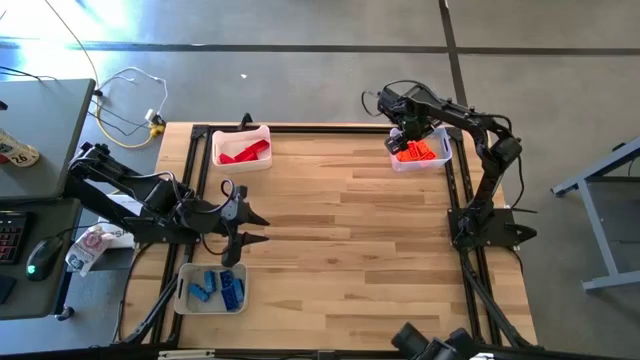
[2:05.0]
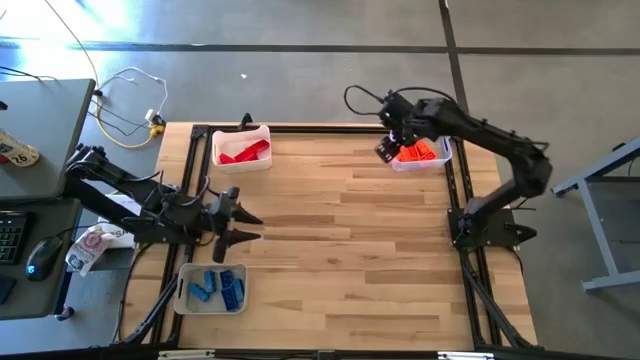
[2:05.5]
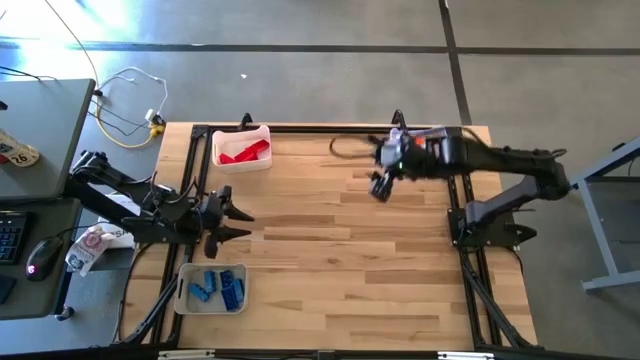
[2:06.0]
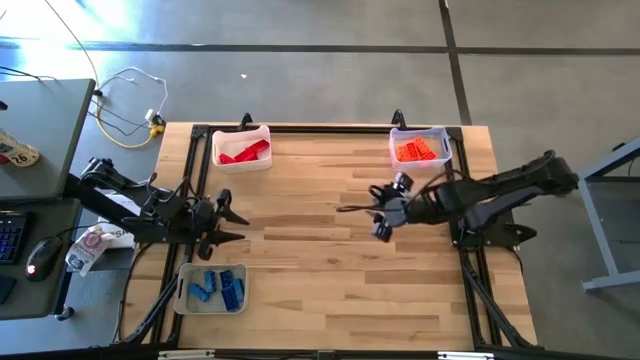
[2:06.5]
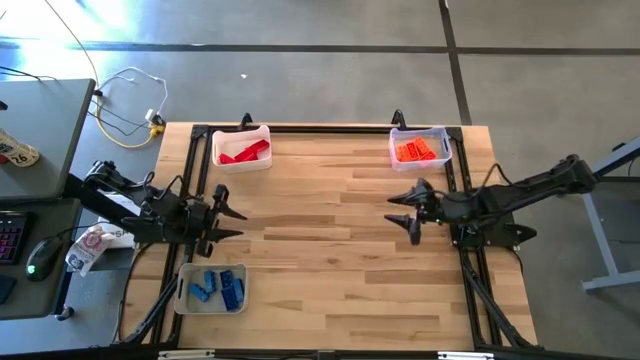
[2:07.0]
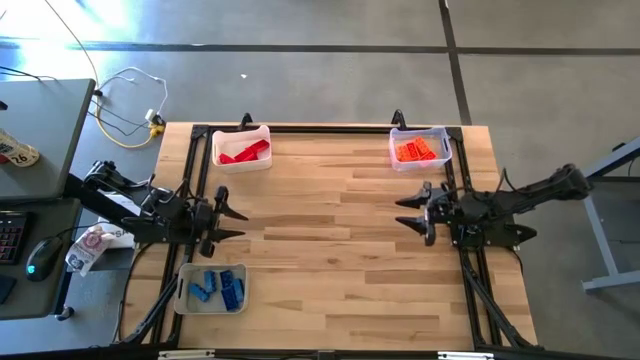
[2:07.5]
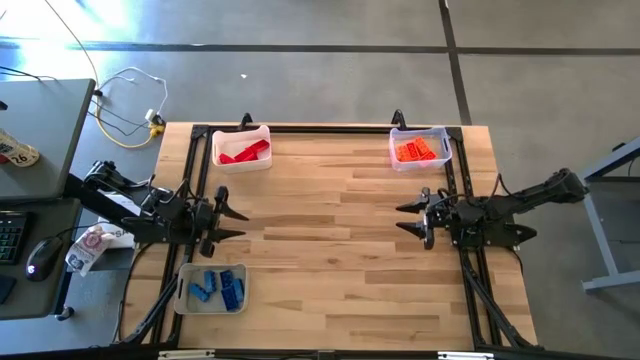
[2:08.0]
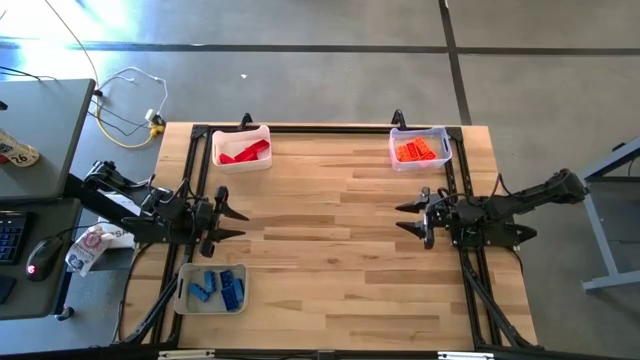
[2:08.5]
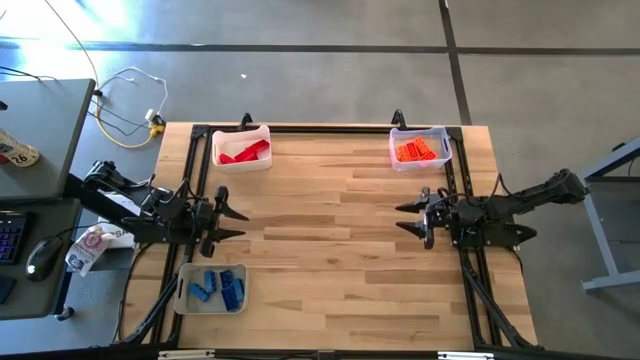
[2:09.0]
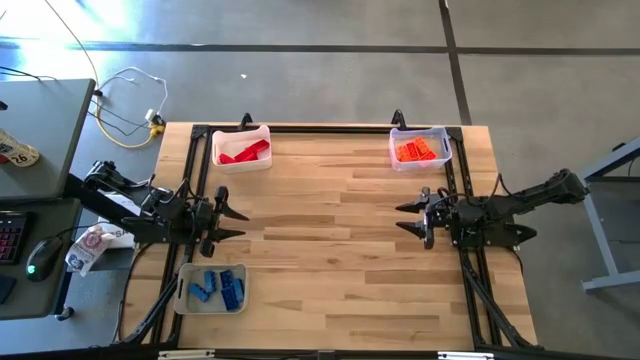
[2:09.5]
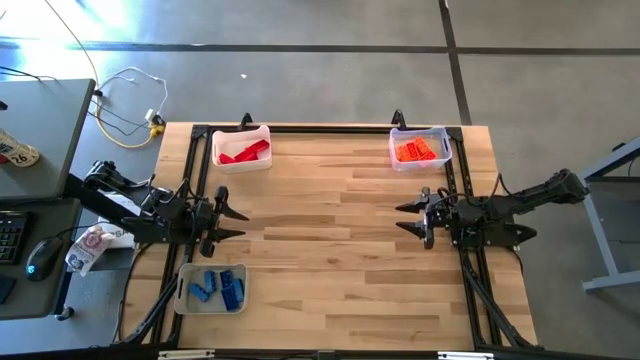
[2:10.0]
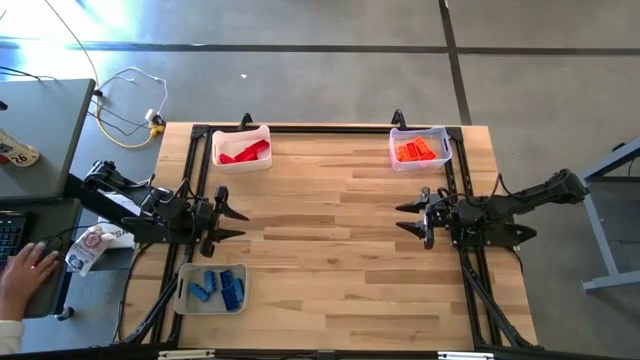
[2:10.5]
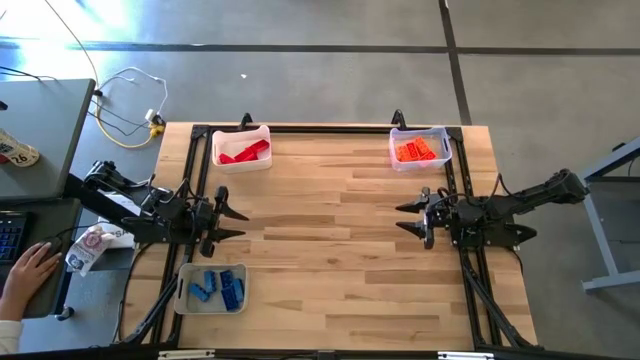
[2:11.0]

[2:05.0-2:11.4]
Task: Sort & place blocks by color
Return to Home Position

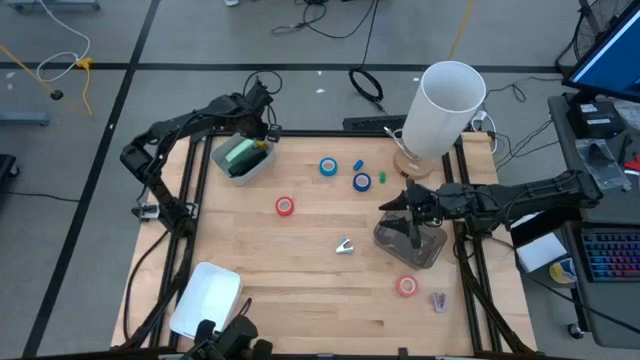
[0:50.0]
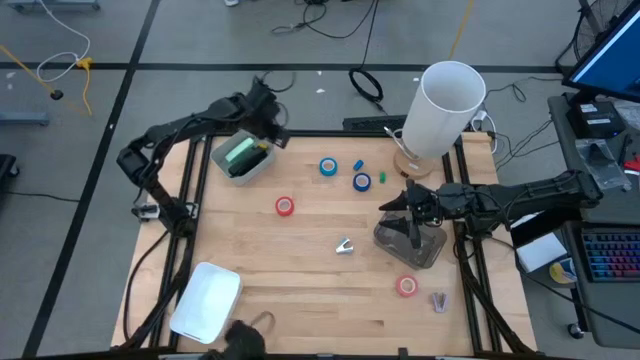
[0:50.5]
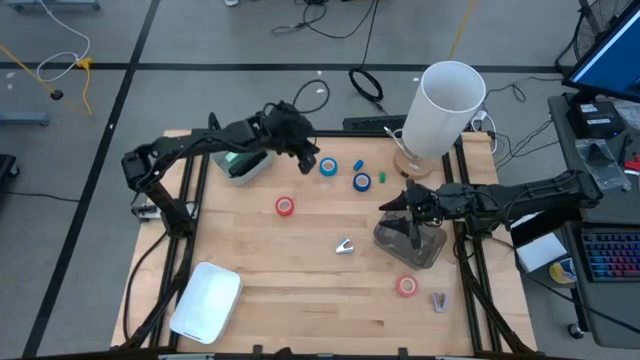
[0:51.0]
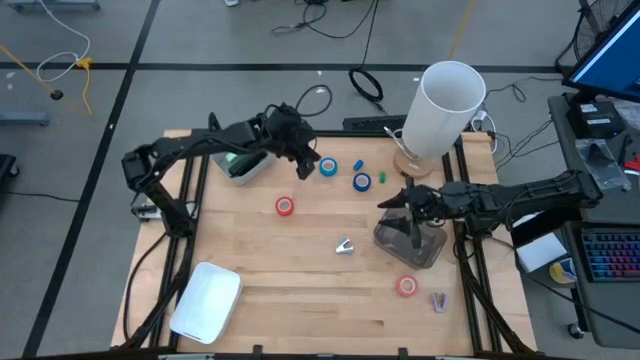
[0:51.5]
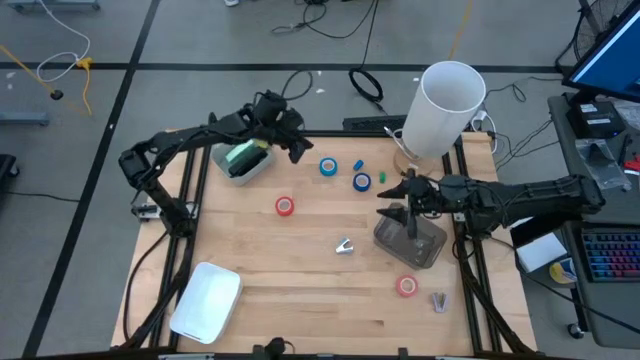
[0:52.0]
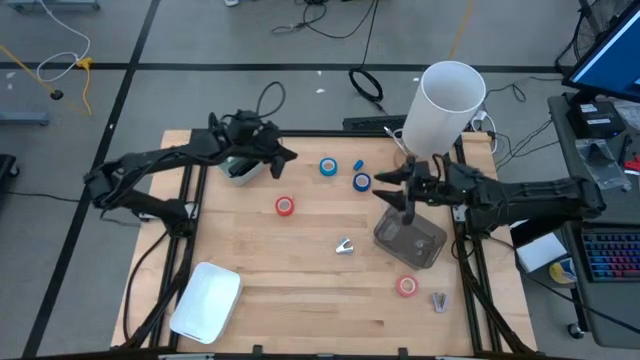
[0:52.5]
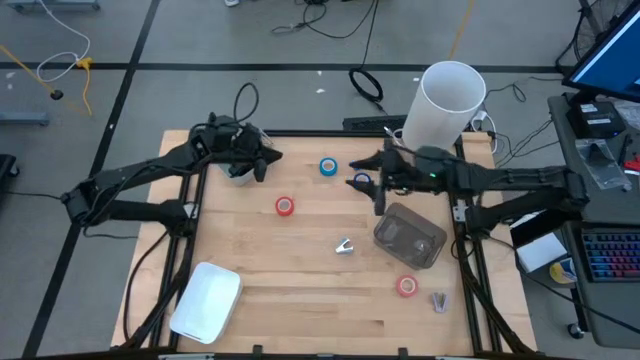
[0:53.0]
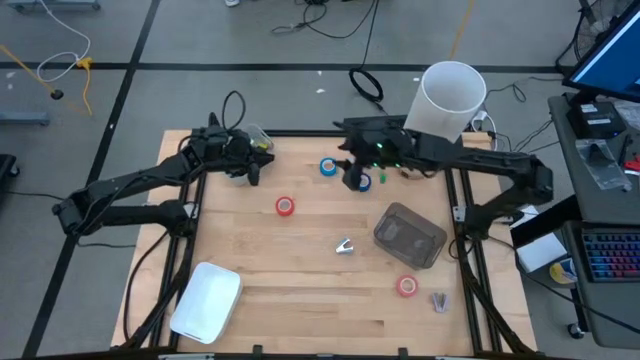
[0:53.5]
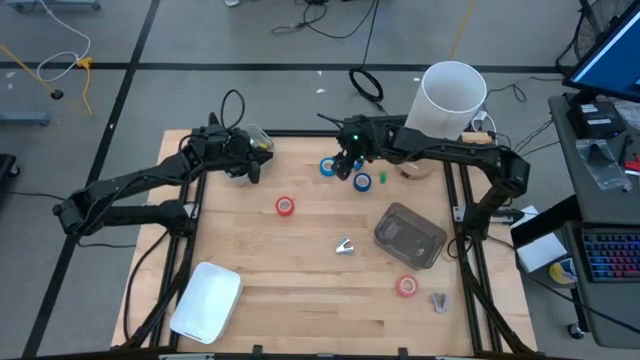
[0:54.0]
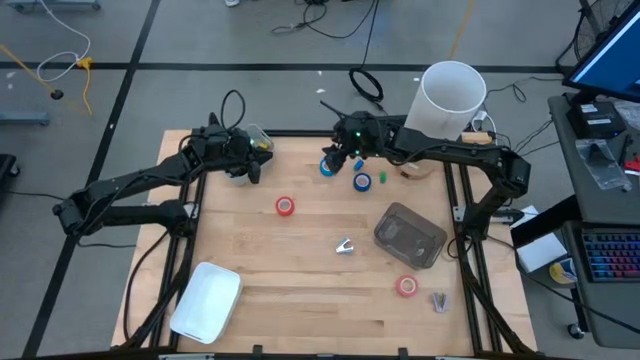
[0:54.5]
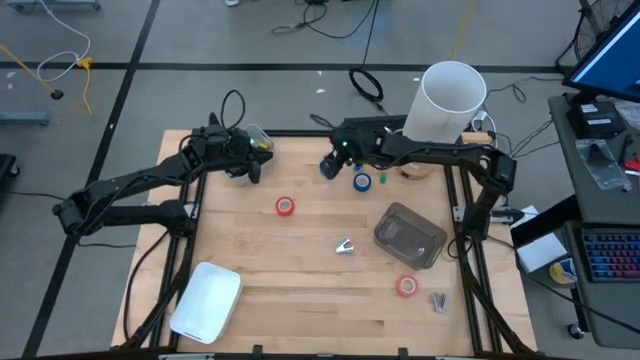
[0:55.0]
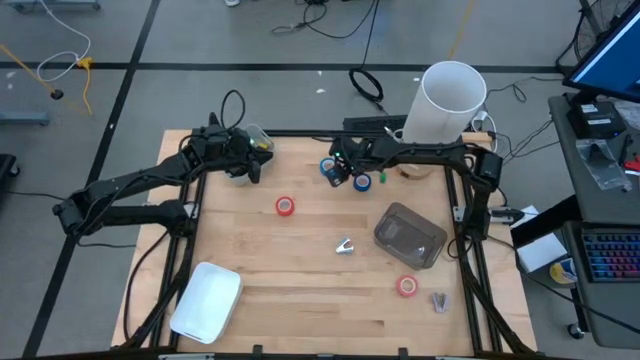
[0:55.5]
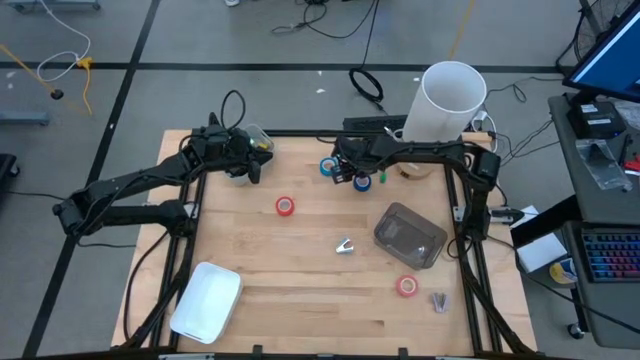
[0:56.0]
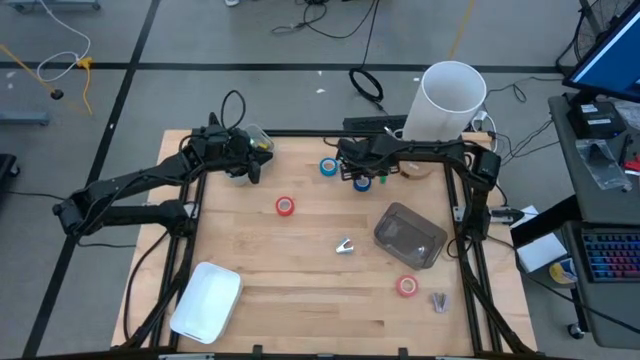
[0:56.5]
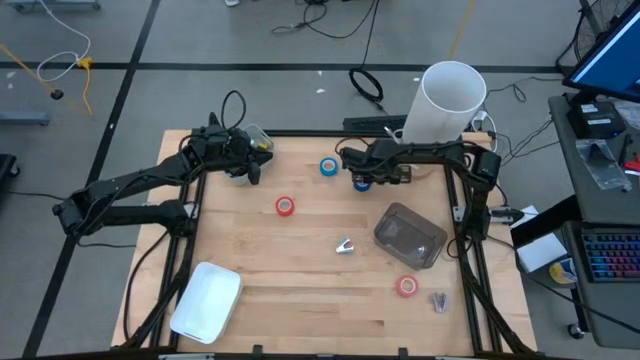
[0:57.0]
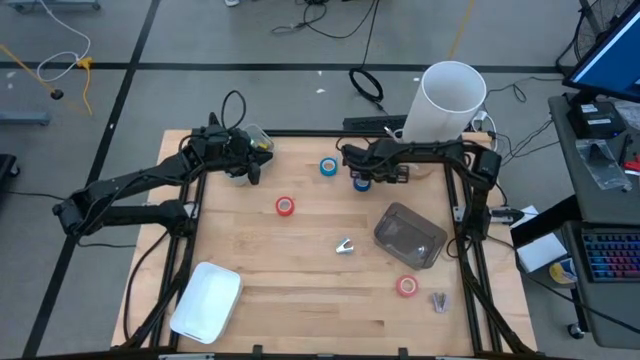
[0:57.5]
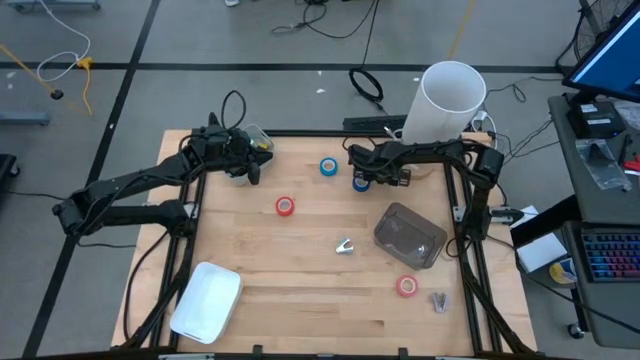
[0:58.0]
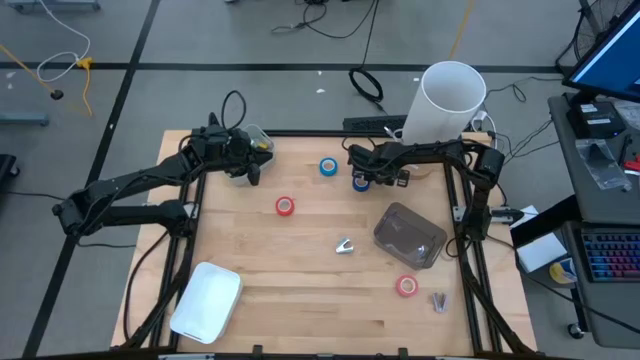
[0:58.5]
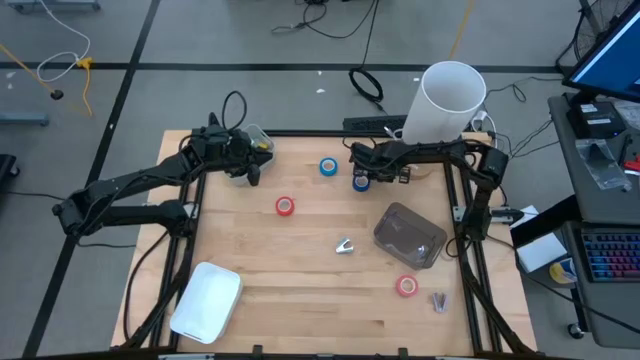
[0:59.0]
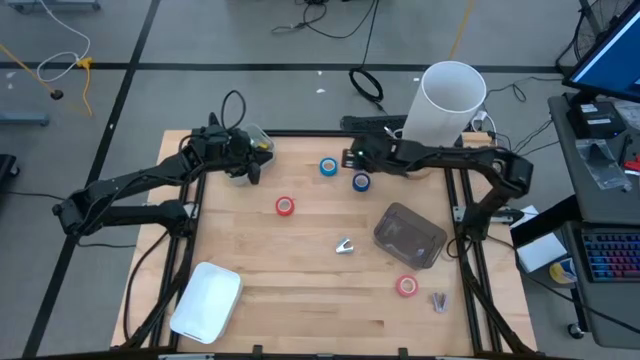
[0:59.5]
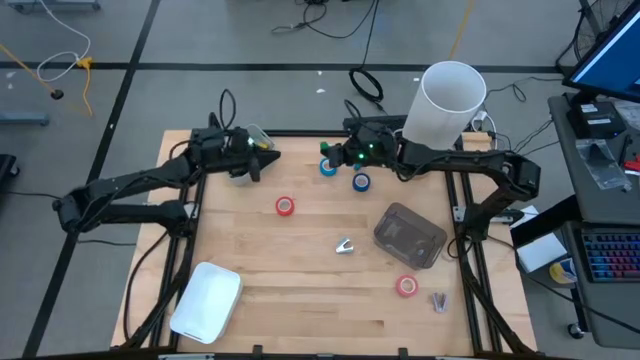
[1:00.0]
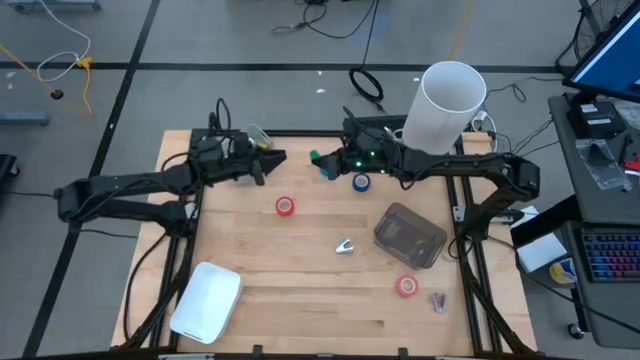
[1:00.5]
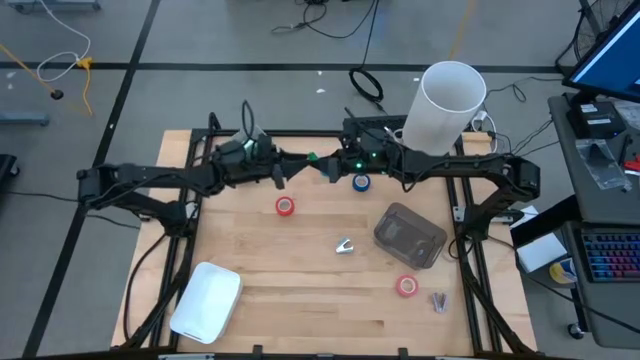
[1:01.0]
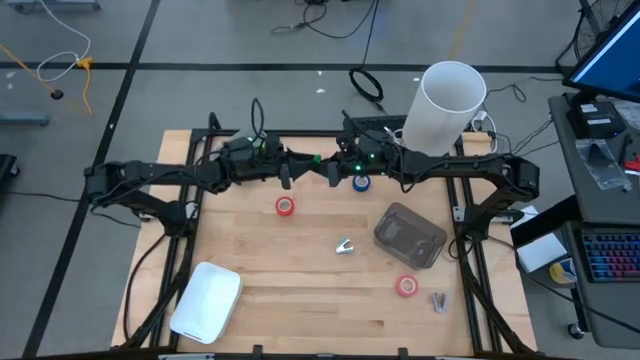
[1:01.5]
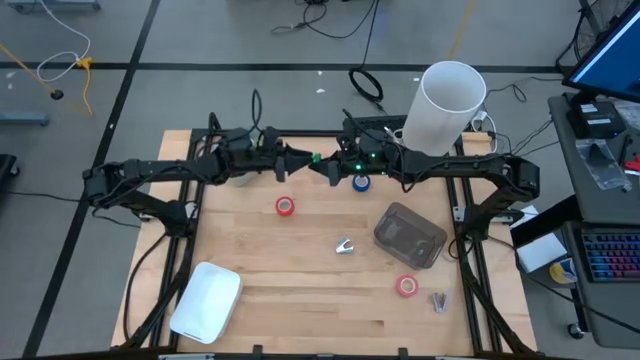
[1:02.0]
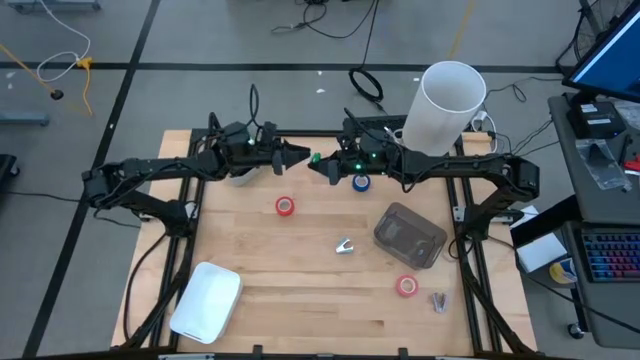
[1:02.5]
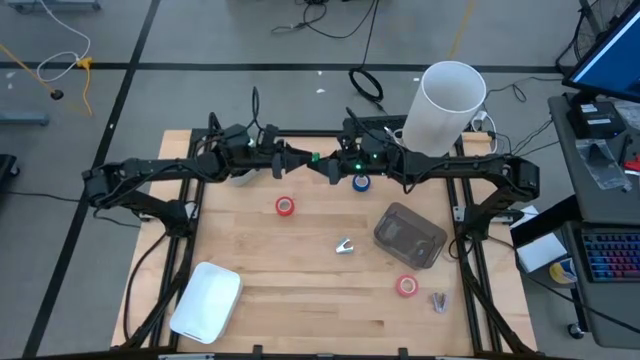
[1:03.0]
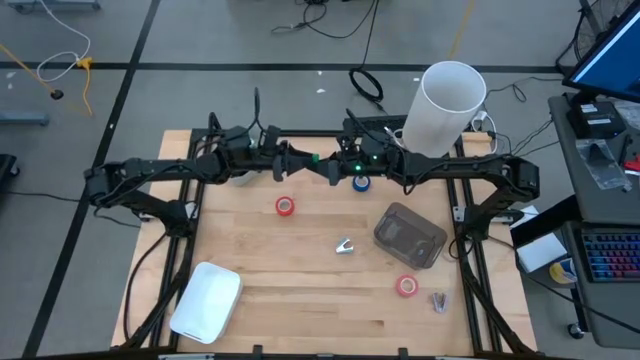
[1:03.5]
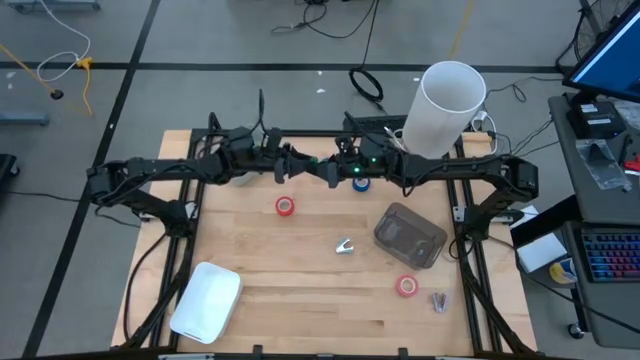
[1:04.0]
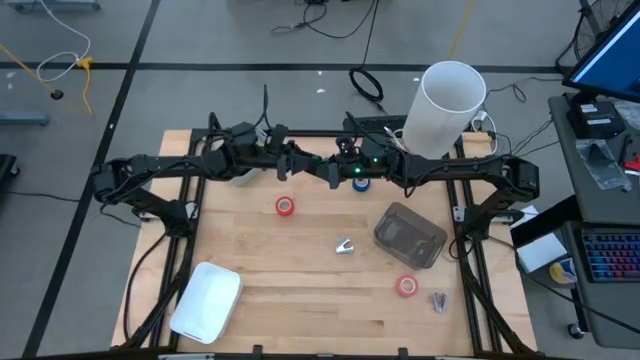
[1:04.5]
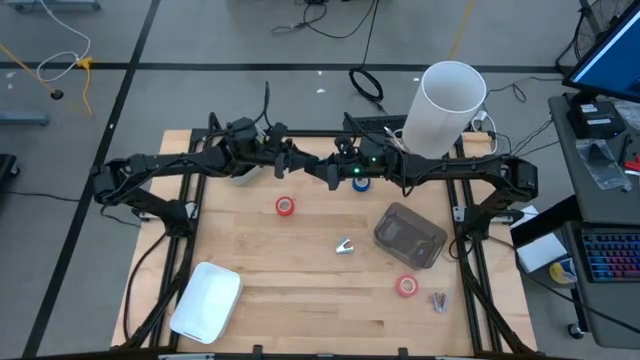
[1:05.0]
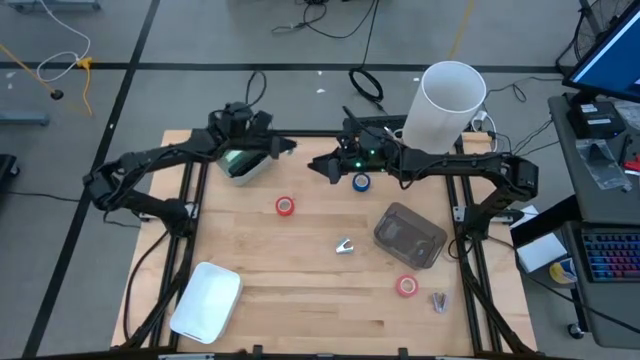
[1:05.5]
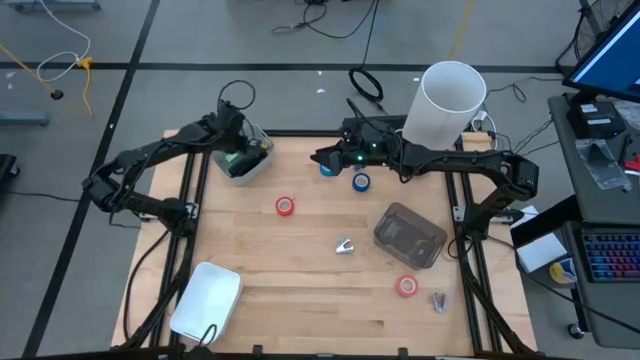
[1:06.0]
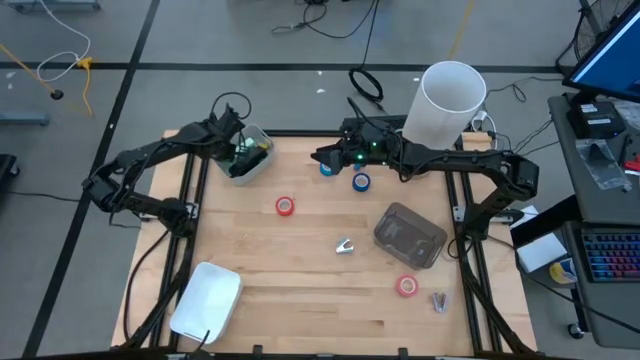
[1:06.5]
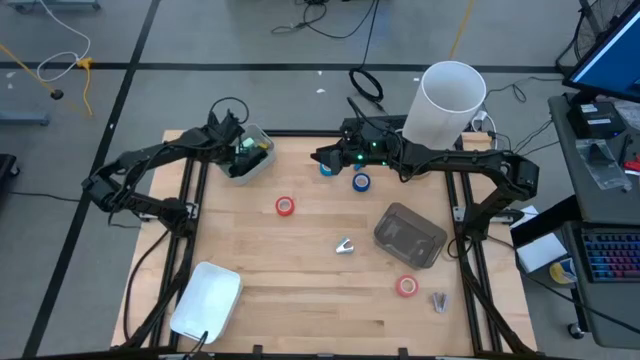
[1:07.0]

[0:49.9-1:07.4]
Task: Pick and place Stapler, Stapler remover, tape
Put the small green stapler into the gray bin
